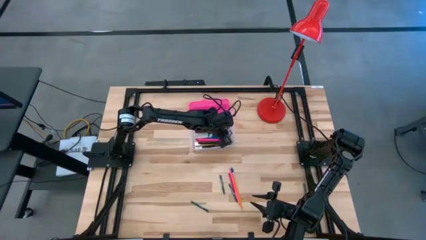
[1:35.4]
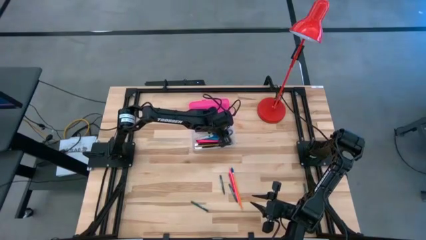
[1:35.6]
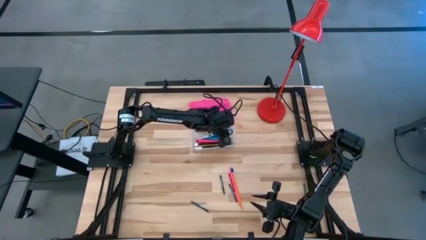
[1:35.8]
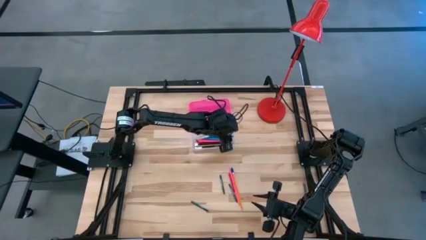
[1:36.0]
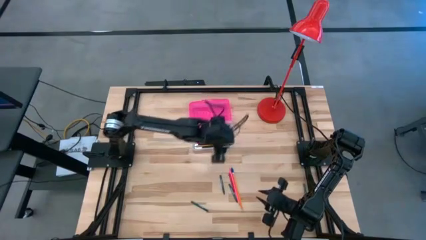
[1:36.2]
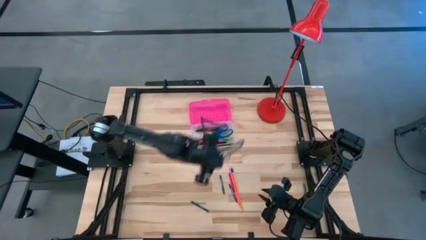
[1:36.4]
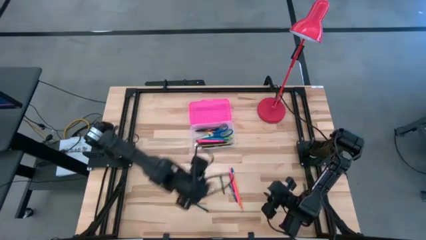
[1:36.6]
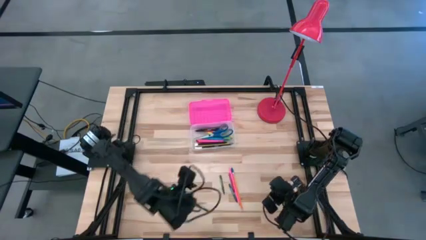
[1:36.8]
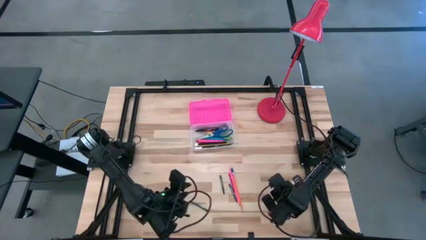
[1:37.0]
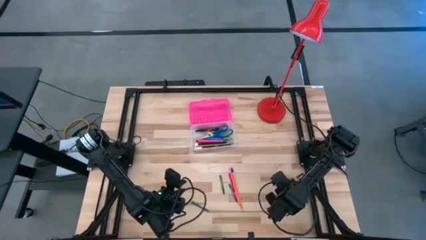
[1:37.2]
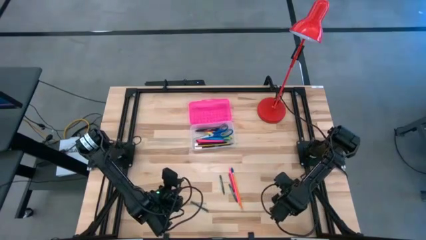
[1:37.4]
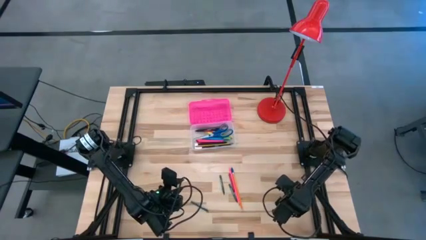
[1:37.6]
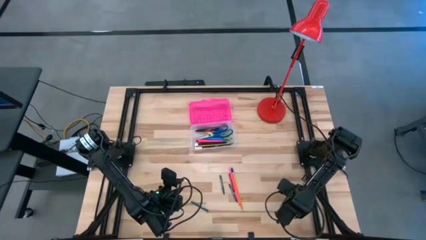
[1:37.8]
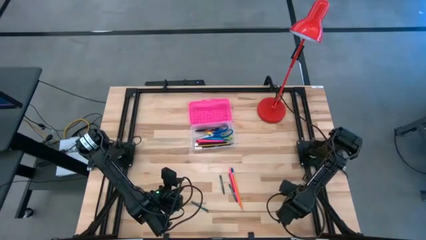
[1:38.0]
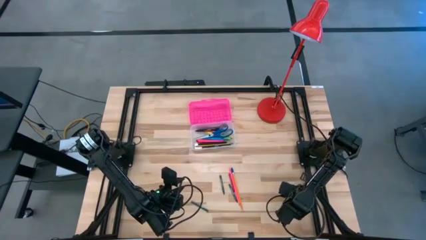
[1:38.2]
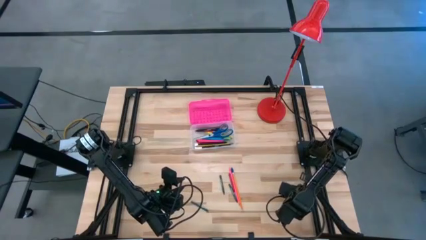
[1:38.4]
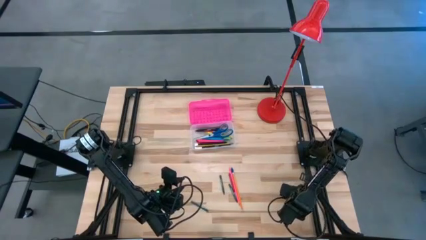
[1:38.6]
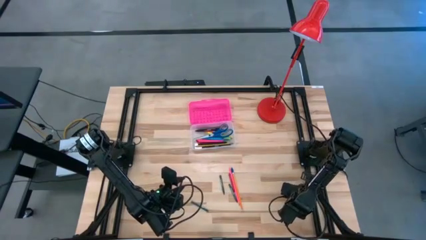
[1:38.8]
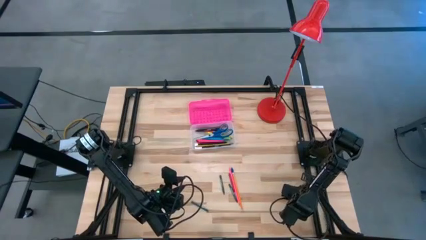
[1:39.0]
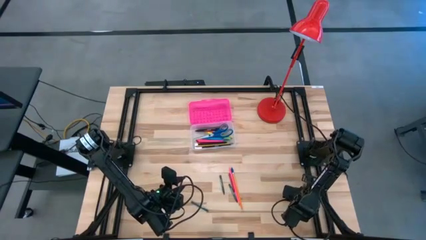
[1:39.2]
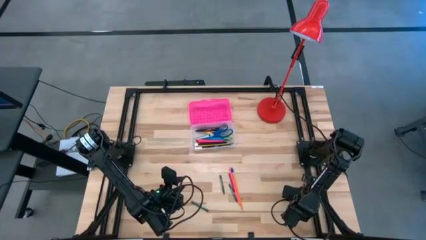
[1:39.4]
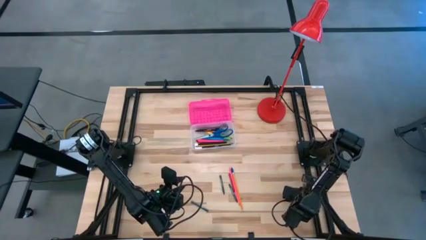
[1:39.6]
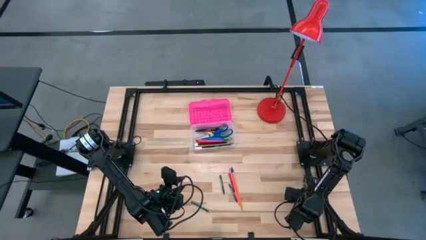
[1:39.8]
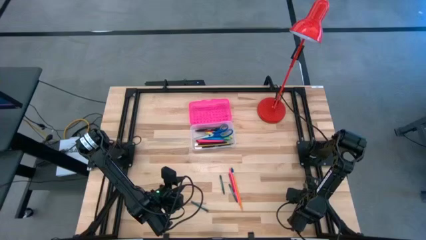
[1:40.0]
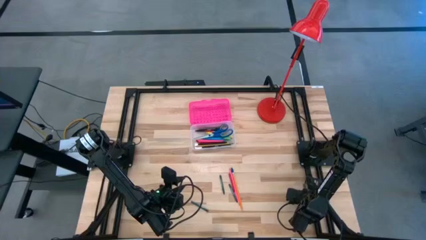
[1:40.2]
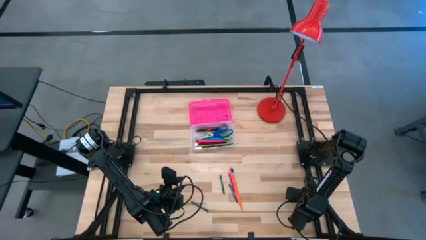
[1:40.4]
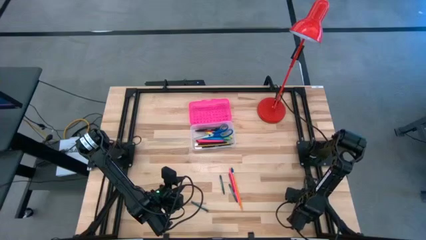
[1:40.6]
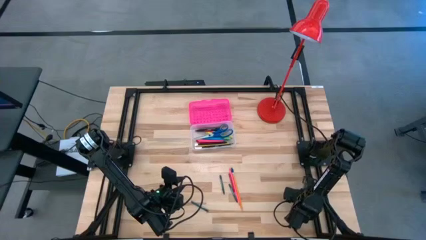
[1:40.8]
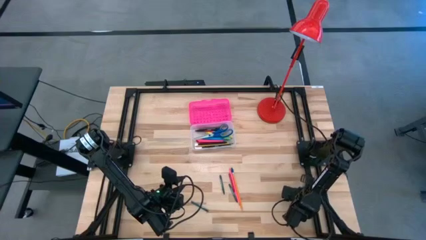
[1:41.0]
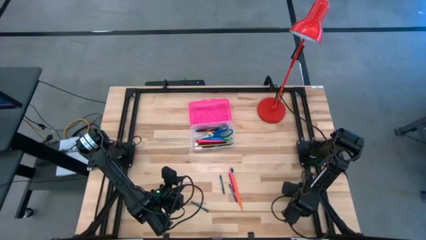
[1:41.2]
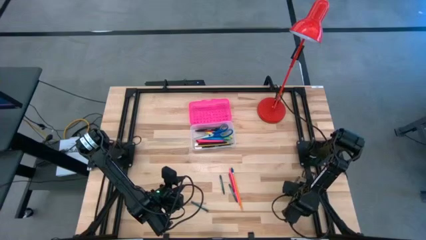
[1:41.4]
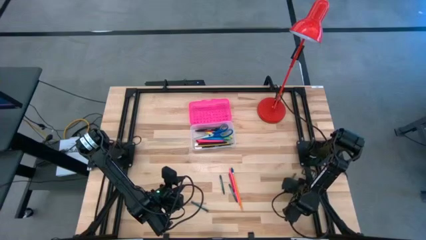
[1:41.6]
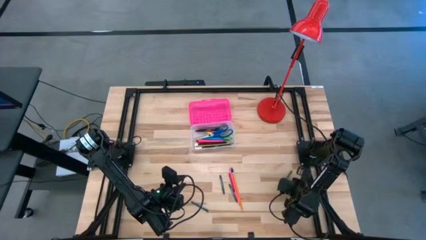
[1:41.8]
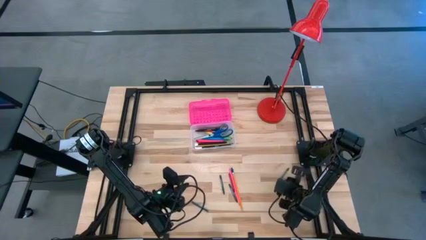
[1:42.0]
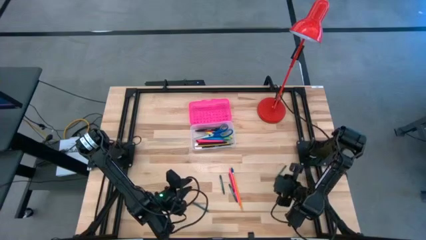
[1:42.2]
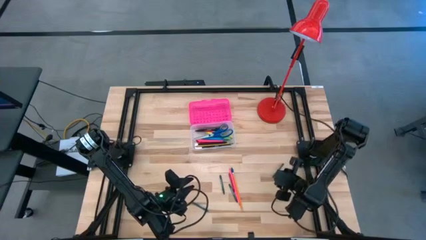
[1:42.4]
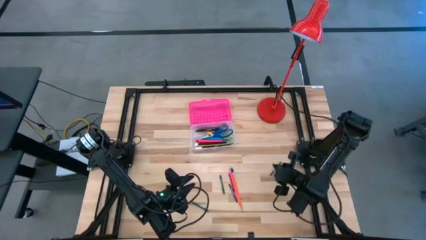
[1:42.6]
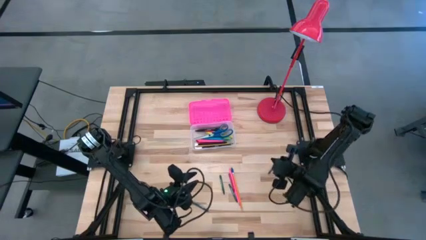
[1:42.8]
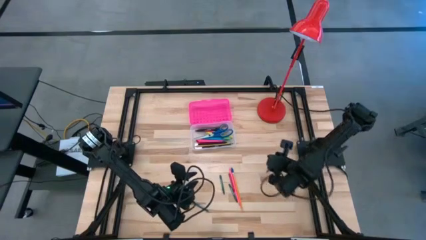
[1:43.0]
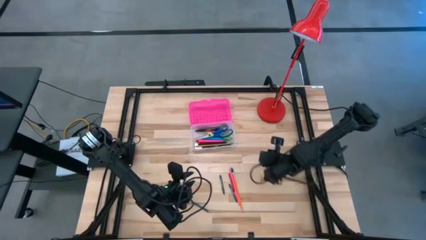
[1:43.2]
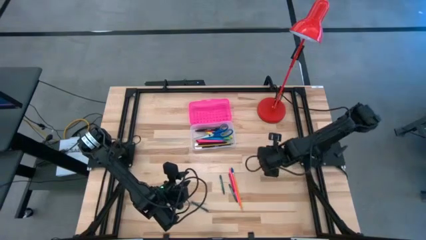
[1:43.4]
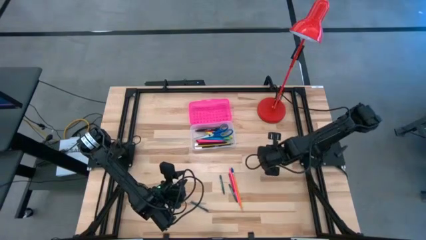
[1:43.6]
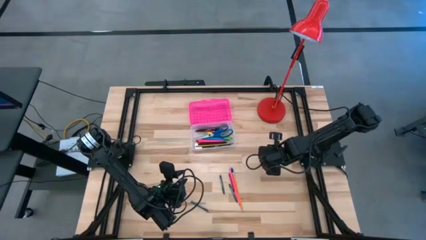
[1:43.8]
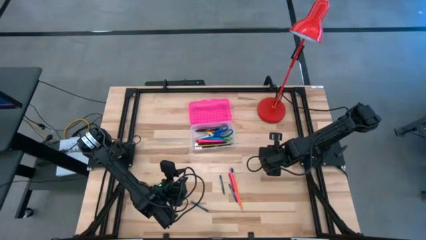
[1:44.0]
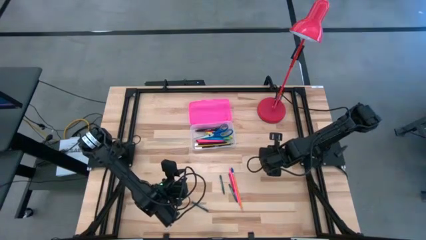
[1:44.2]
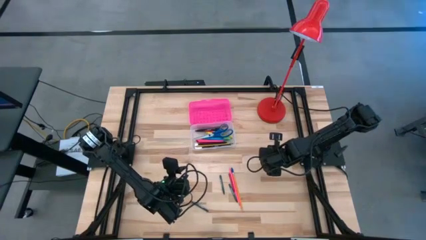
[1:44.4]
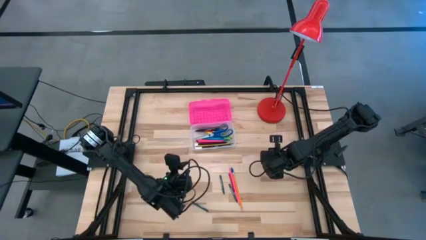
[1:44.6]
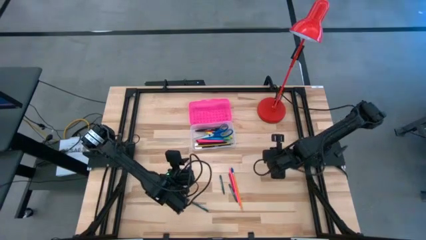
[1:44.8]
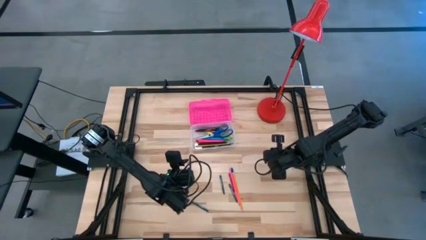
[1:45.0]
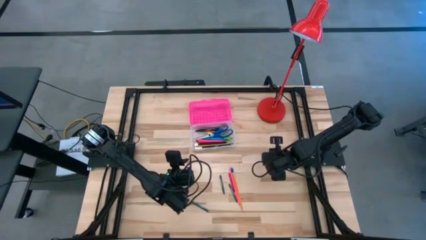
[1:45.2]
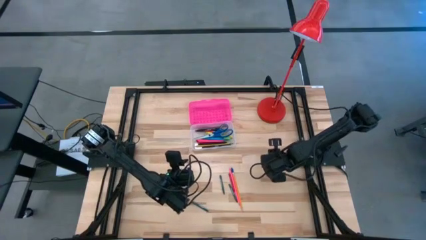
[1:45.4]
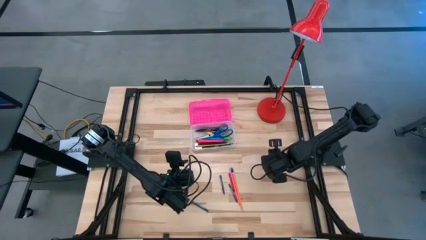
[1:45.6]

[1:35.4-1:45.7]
Task: Pick & place school supplies into a supply box
Put the green crayon into the pink supply box
